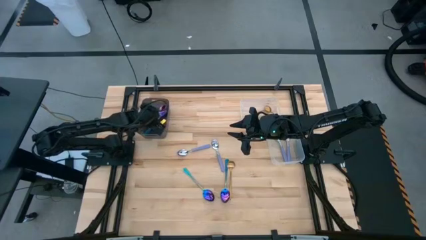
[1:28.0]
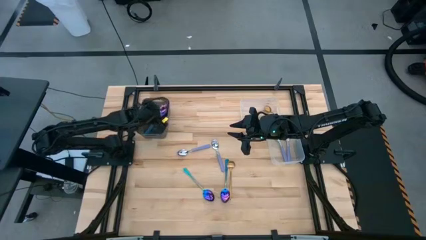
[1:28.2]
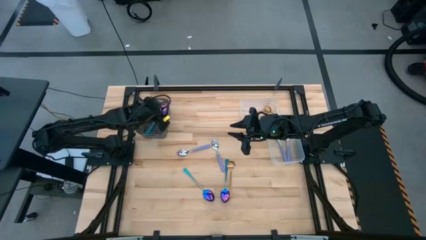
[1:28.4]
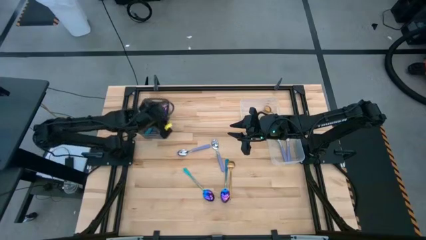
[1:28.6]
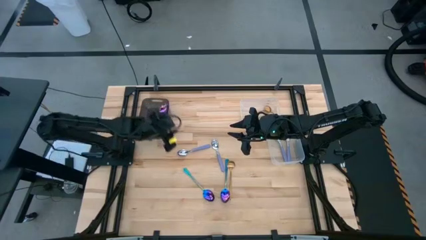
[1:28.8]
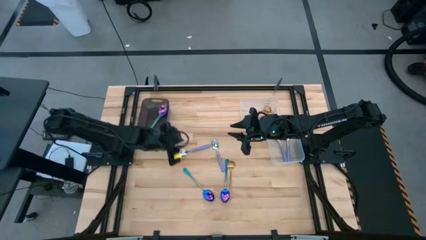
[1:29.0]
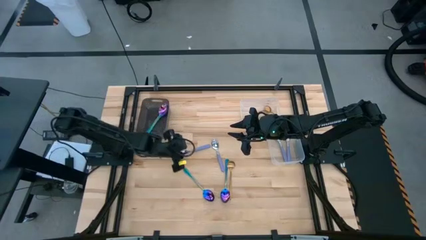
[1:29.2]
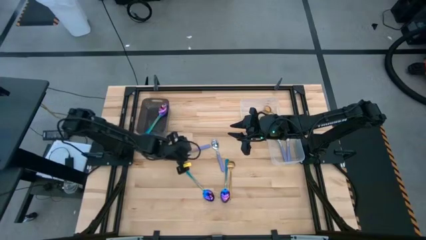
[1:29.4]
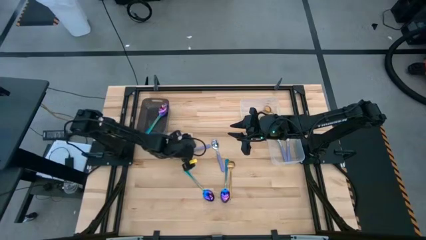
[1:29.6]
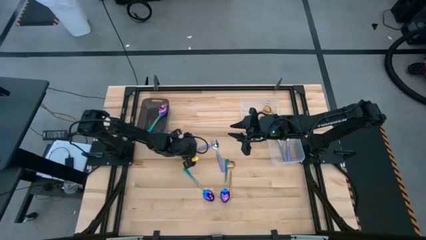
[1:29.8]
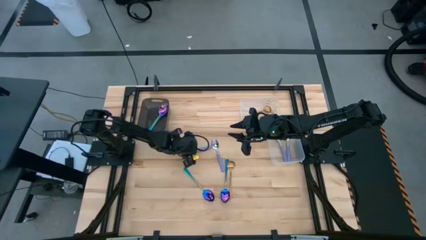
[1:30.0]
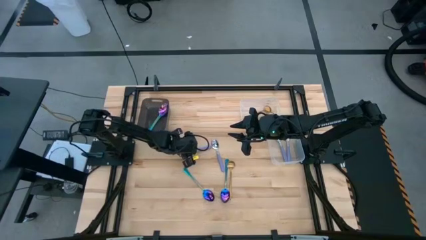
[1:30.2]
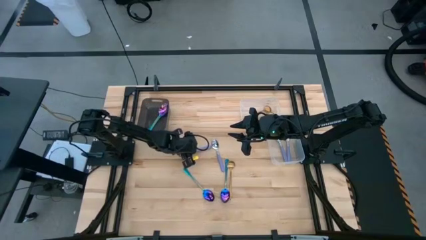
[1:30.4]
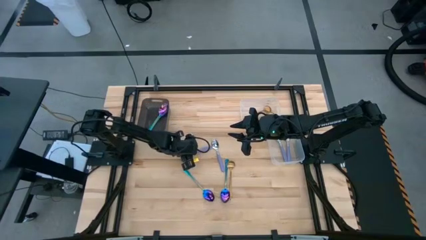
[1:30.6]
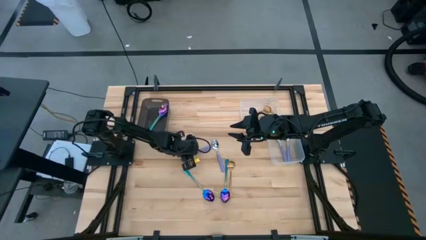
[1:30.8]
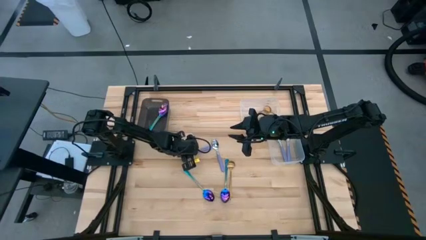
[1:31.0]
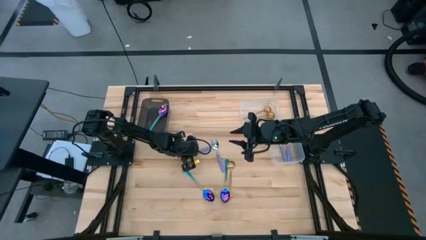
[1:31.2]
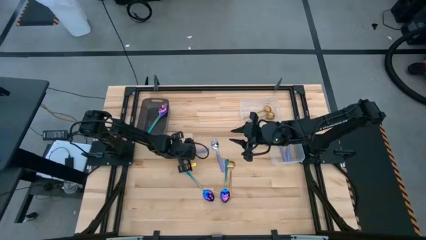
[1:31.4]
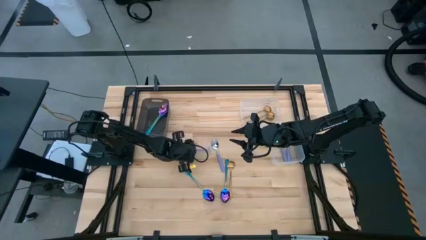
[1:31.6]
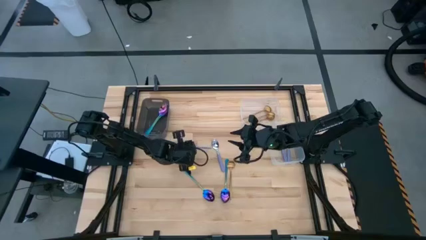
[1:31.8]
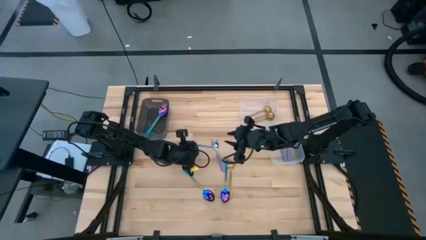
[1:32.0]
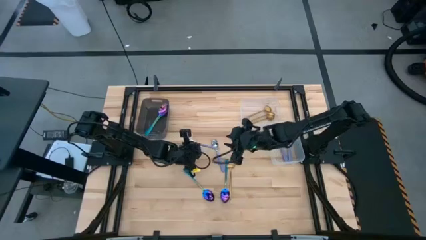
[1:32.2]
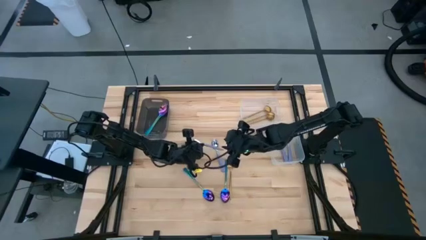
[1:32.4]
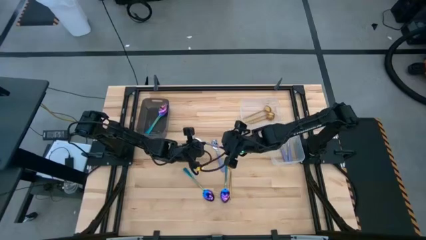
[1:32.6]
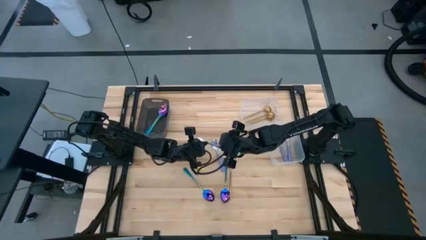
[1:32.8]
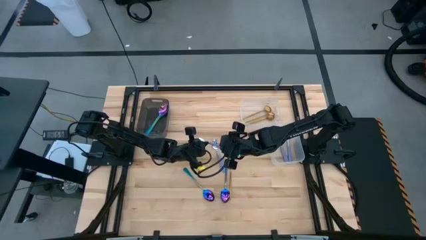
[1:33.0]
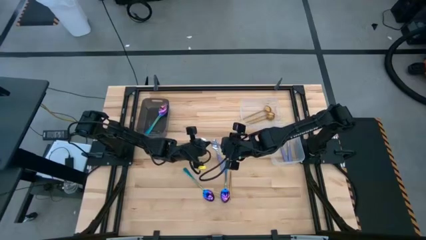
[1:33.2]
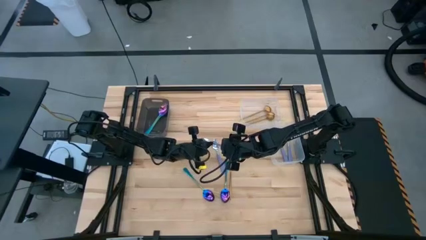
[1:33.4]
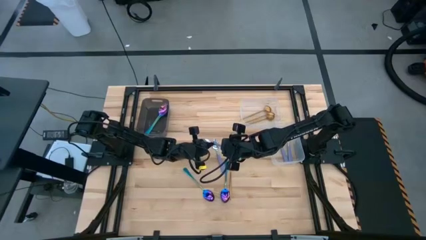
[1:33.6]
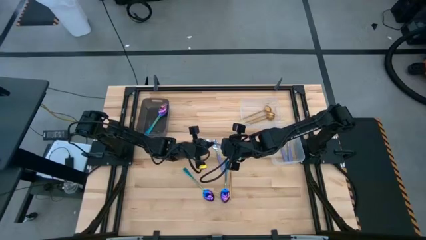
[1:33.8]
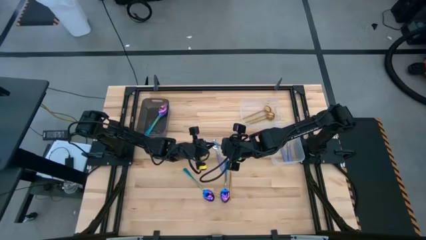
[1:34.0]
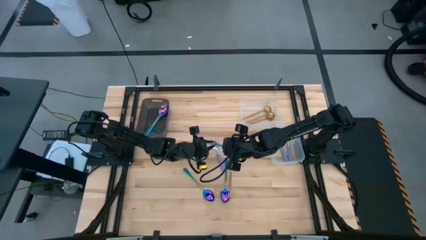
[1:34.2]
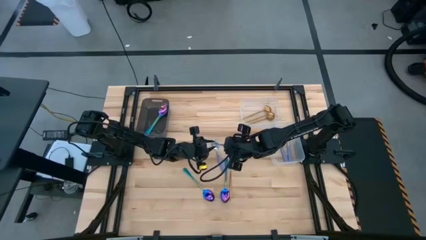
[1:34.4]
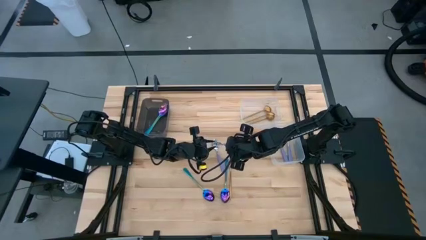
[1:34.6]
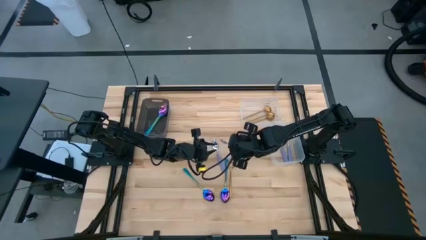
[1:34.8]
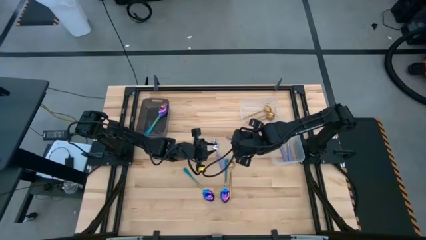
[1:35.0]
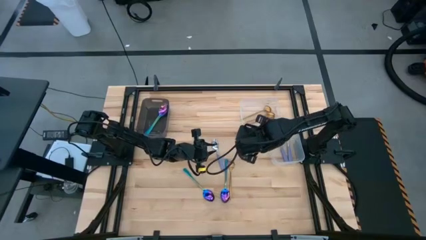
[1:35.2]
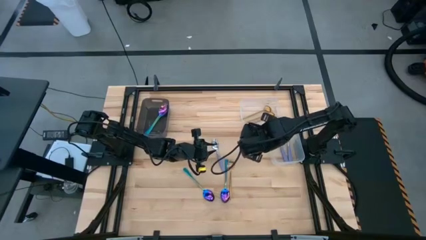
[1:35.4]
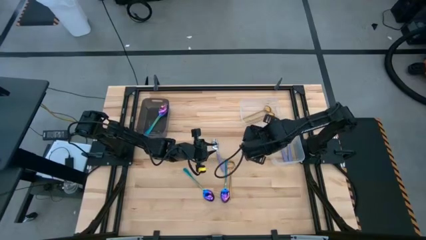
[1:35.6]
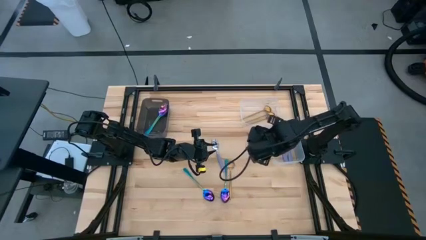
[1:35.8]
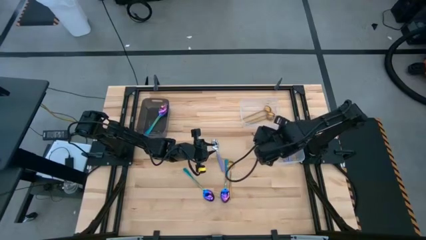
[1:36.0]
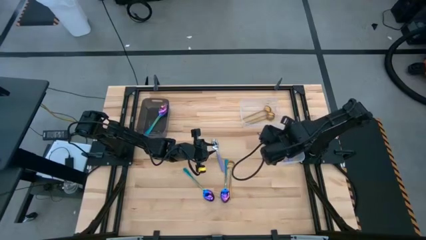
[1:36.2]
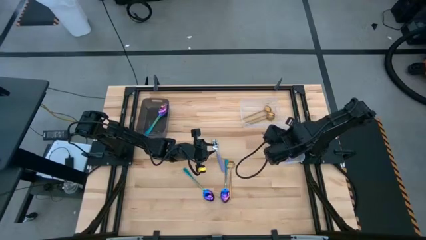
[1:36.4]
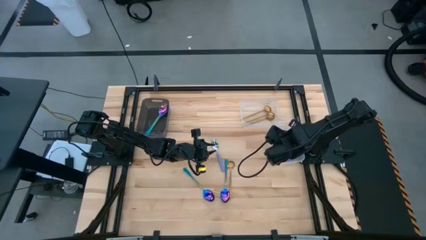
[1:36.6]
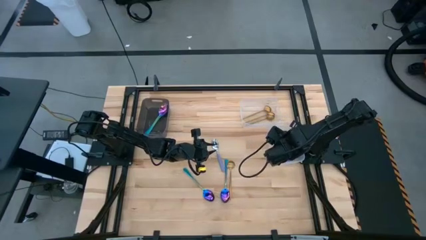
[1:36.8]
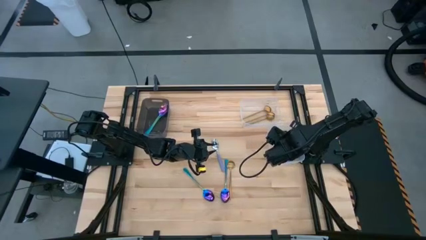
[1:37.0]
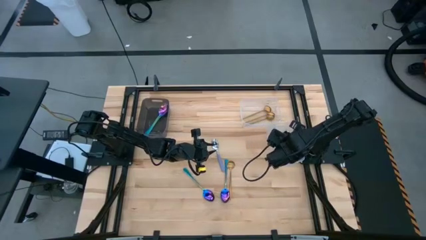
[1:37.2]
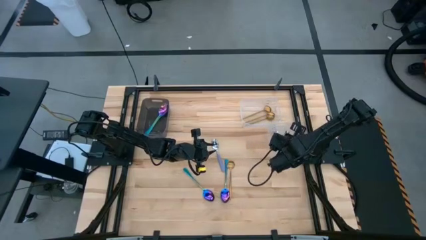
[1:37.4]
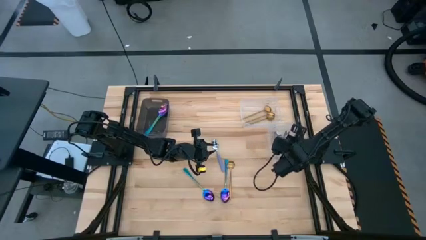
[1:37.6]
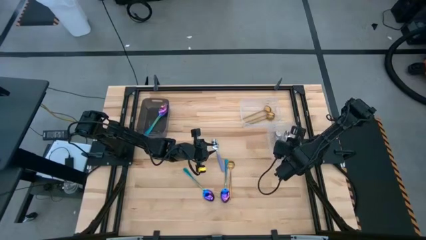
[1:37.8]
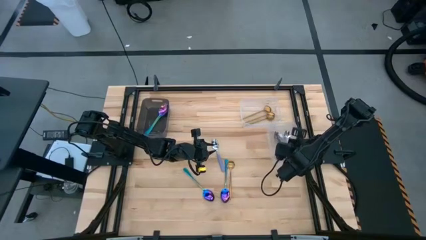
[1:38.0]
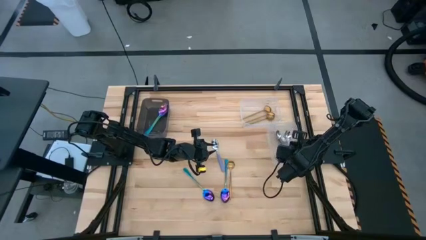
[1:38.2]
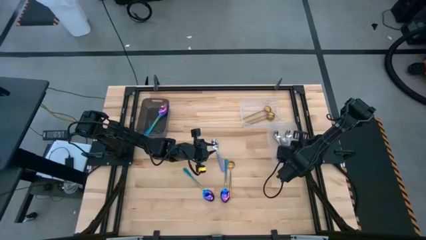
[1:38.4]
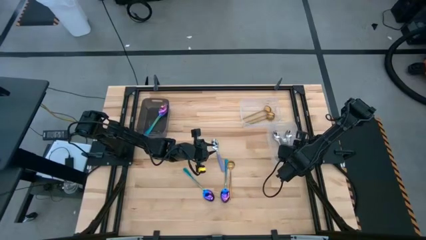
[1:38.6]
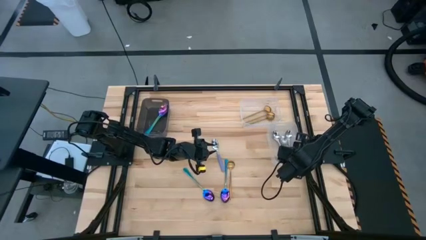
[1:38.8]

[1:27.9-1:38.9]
Task: Sort silverware by color (type)
Put the purple spoon into the bottom transparent bin

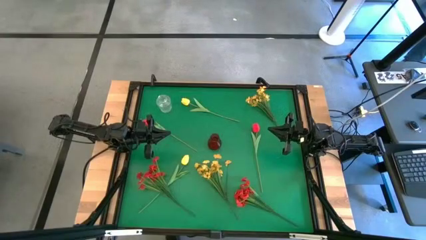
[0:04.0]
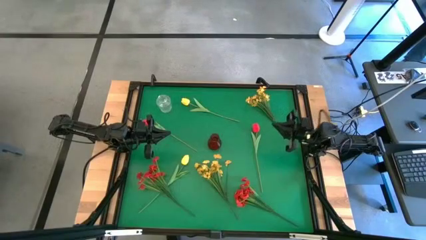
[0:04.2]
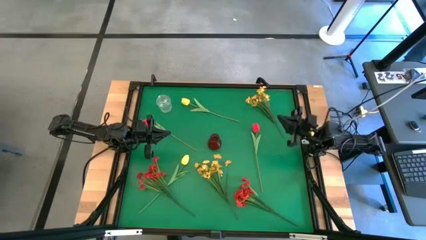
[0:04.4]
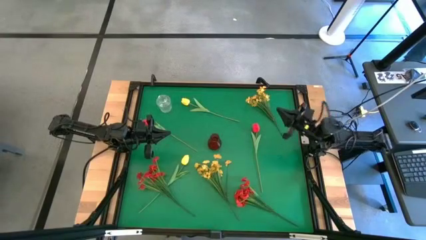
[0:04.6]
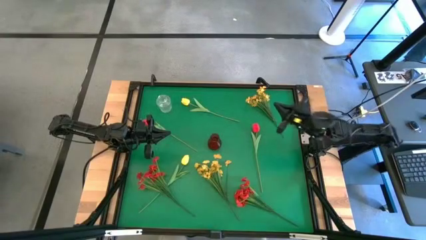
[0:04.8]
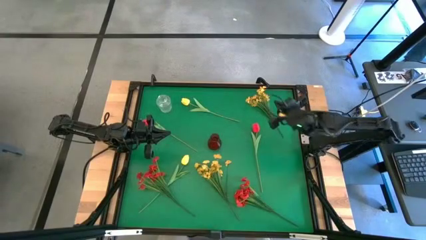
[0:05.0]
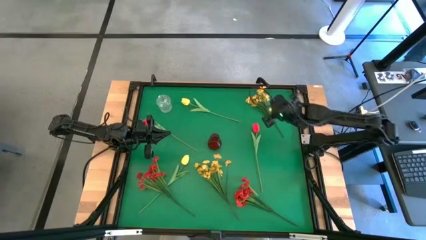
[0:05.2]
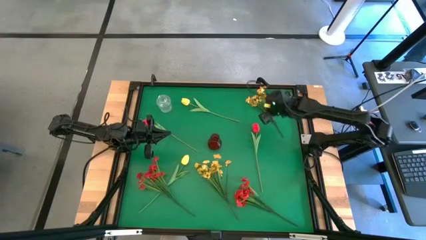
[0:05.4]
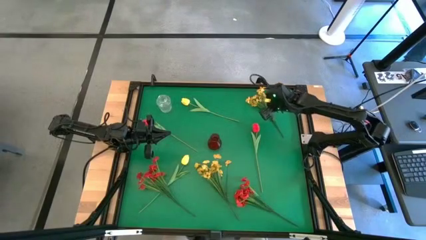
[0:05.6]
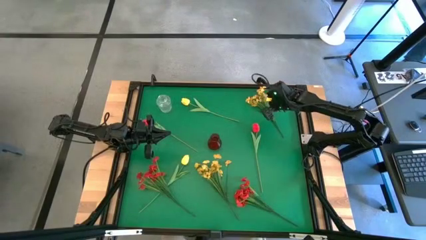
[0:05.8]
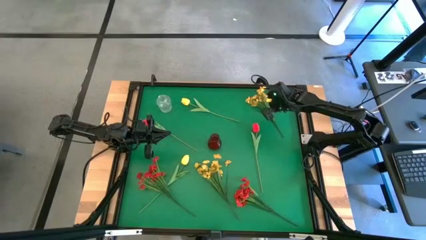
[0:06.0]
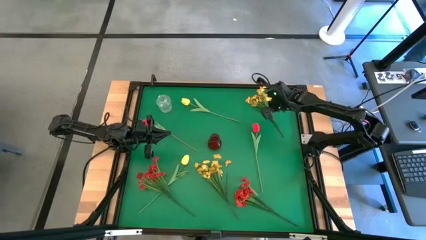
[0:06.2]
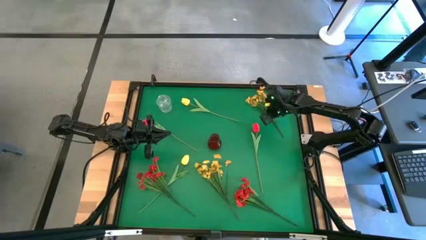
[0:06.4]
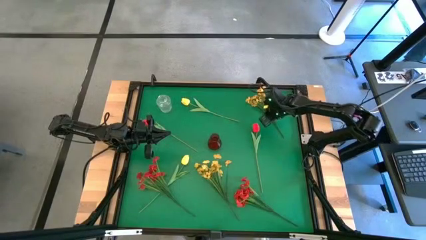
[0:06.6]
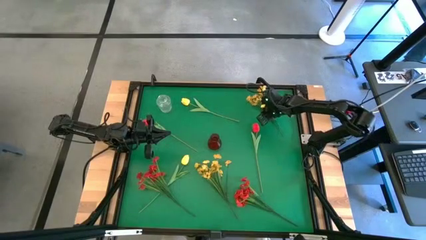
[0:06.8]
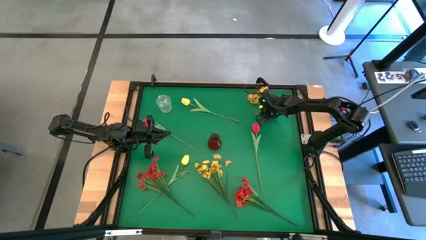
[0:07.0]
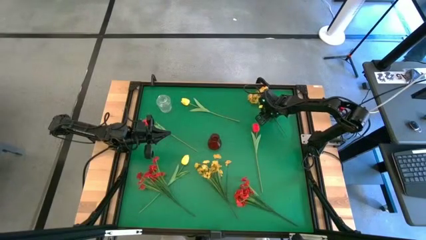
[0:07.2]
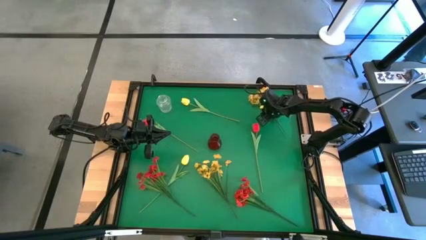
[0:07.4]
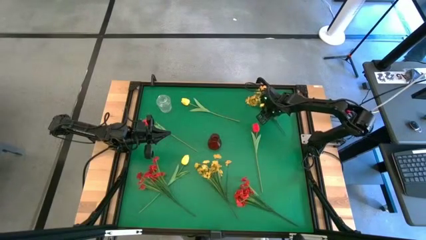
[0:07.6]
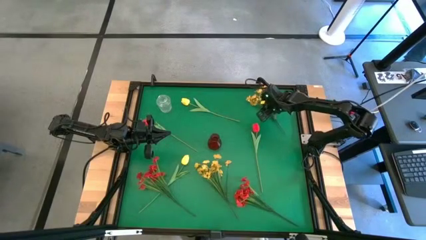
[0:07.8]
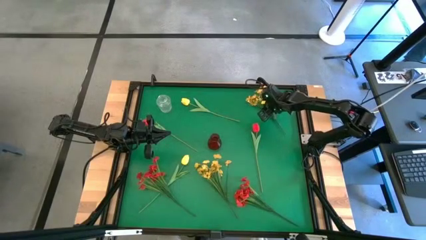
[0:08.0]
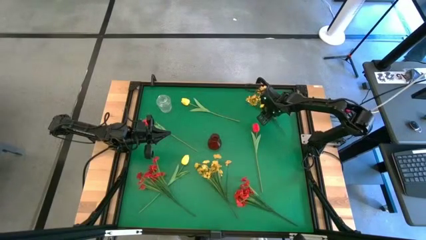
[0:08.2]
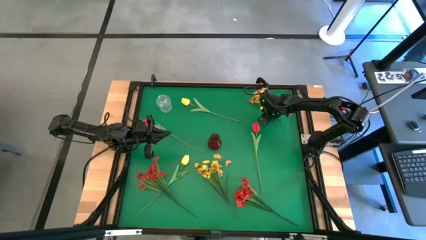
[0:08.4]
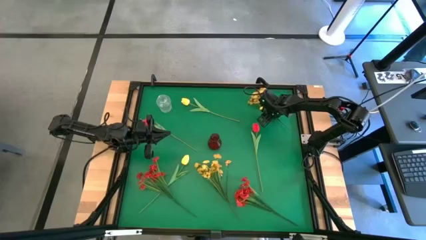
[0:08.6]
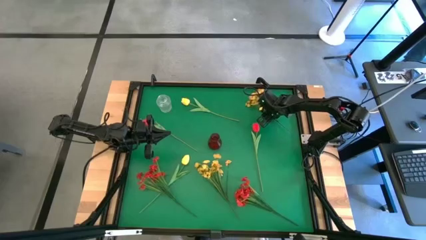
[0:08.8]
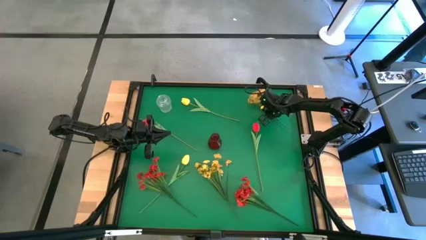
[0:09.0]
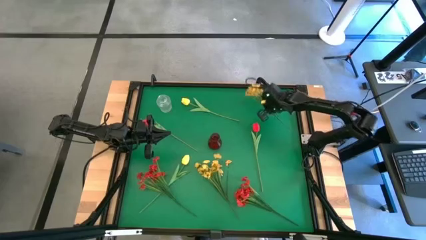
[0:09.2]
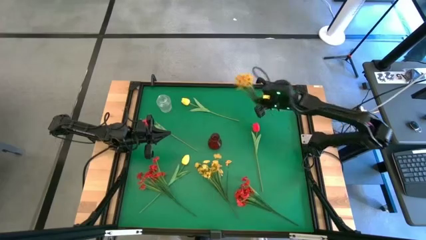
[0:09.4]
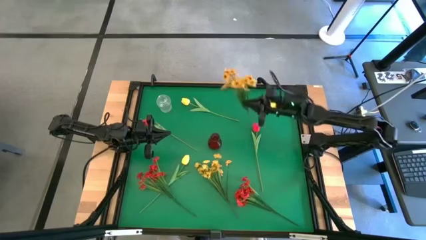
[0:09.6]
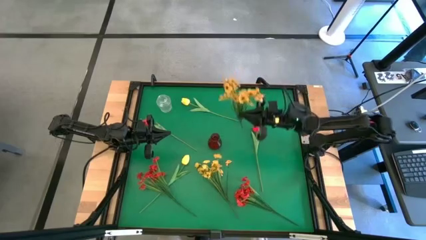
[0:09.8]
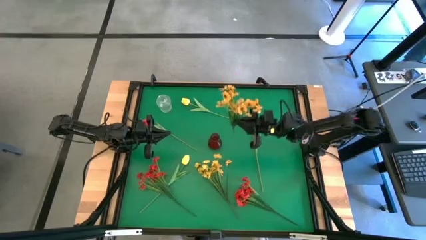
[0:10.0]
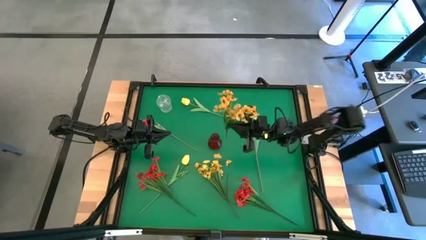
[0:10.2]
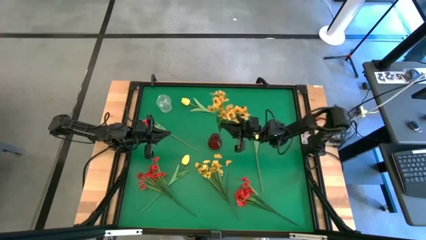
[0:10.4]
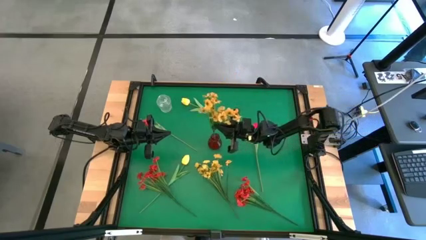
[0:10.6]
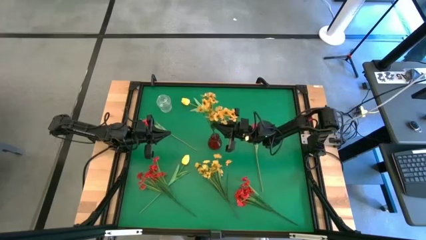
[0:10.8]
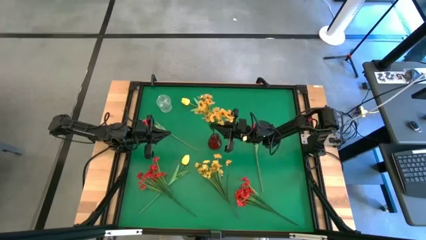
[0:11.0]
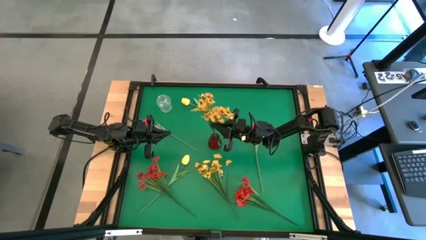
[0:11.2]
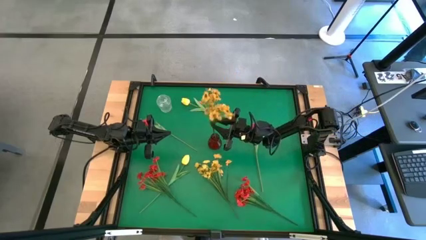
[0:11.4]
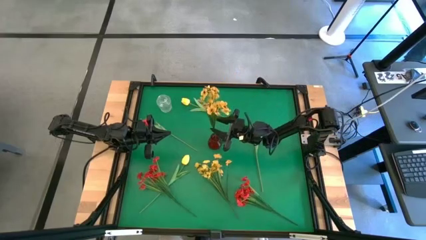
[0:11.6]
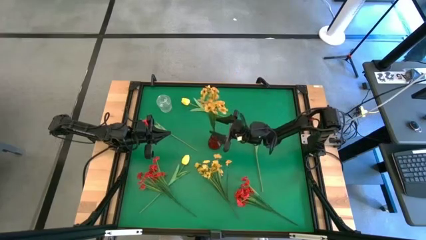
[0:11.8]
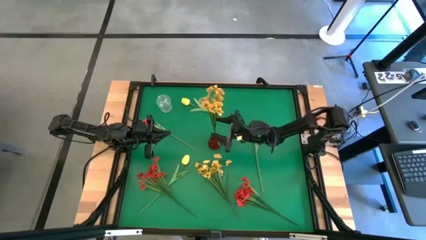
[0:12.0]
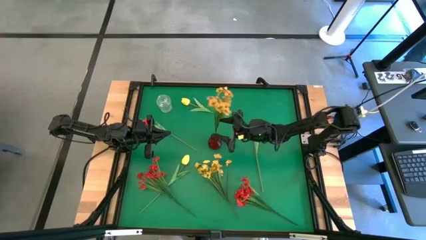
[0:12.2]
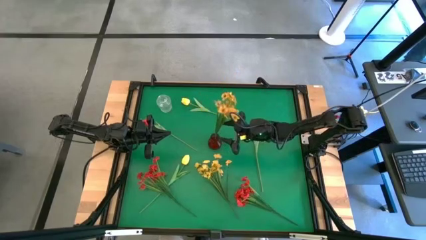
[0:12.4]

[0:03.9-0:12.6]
Task: Sort flowers into vase by color
Put the top yellow flowers into the red vase
